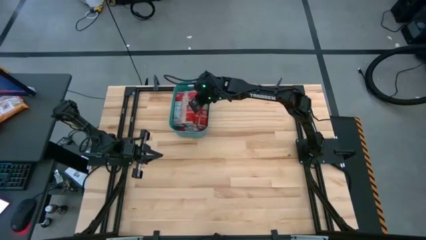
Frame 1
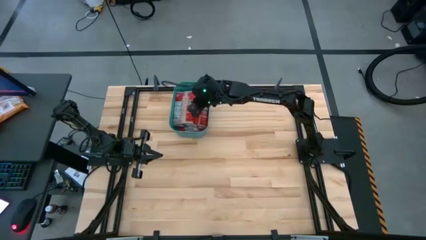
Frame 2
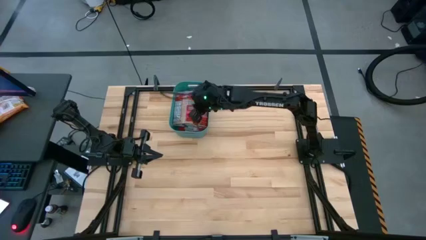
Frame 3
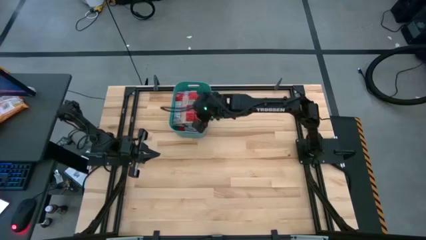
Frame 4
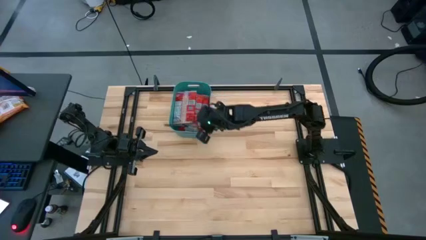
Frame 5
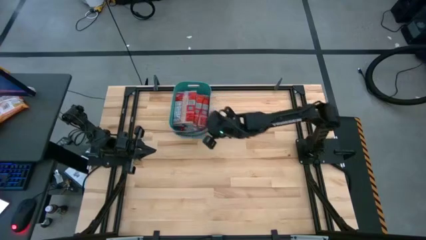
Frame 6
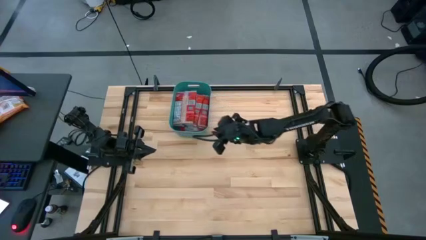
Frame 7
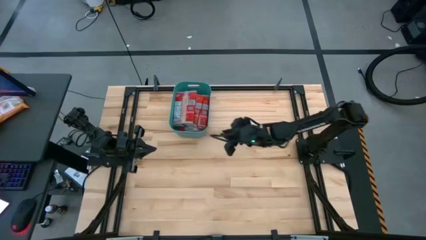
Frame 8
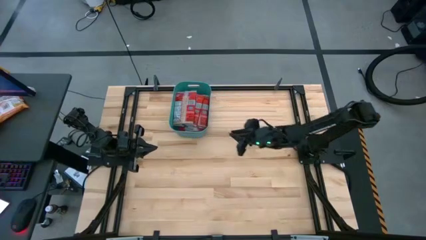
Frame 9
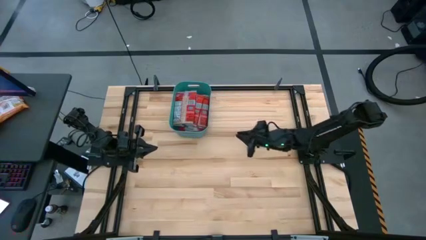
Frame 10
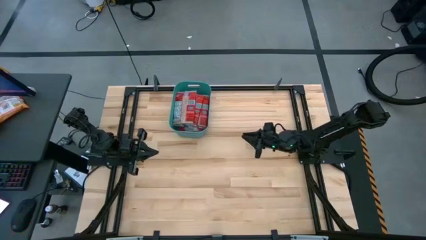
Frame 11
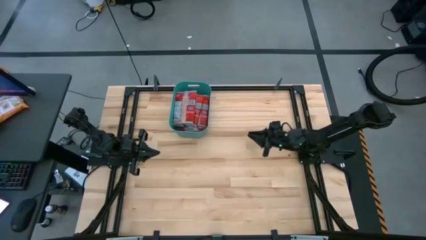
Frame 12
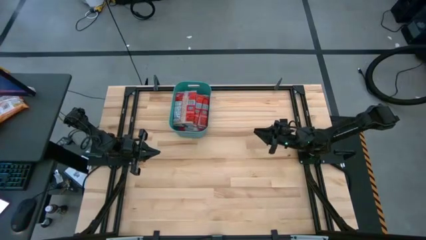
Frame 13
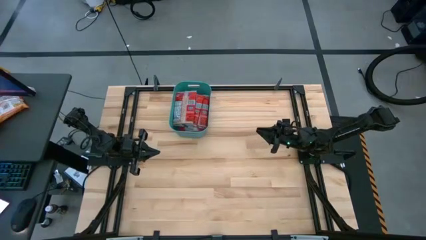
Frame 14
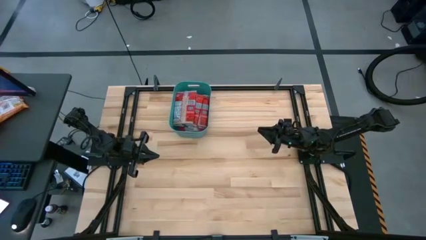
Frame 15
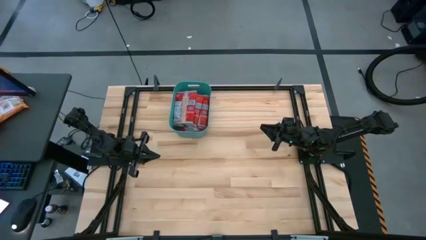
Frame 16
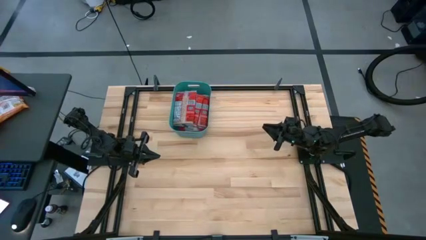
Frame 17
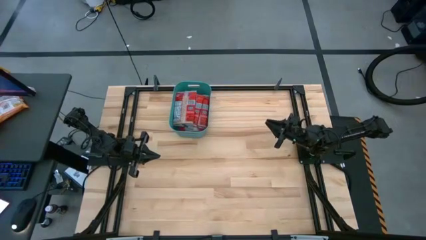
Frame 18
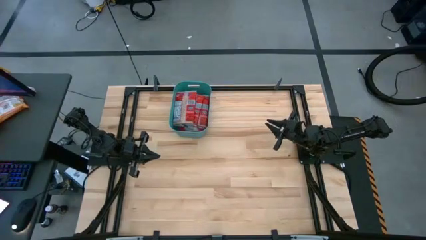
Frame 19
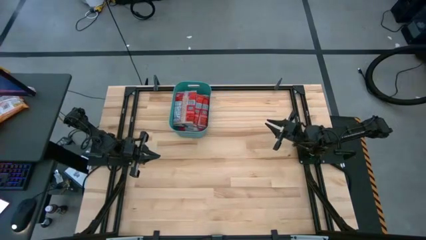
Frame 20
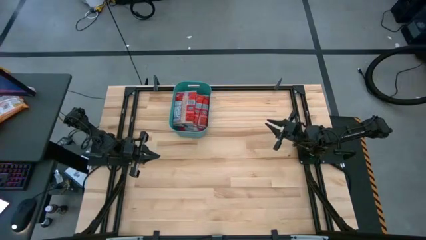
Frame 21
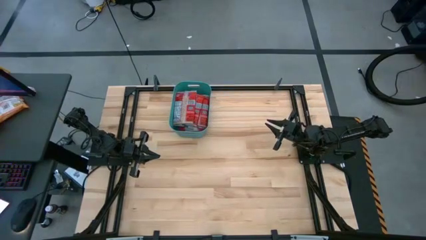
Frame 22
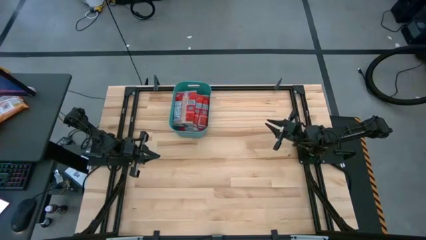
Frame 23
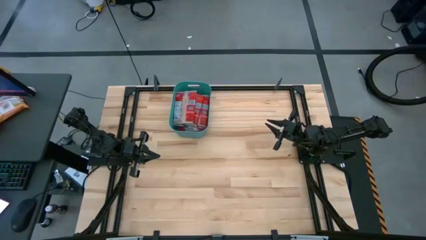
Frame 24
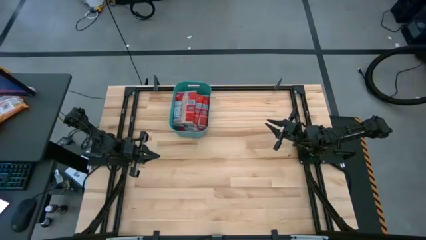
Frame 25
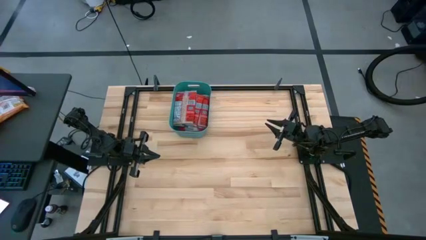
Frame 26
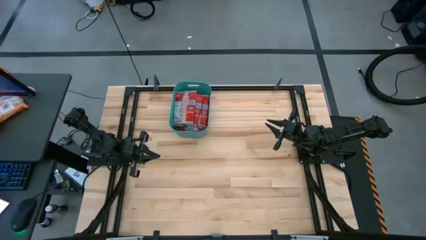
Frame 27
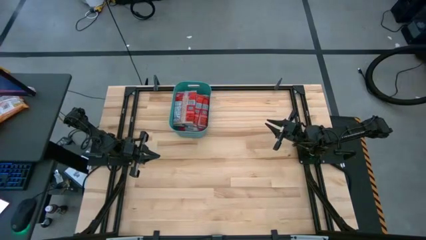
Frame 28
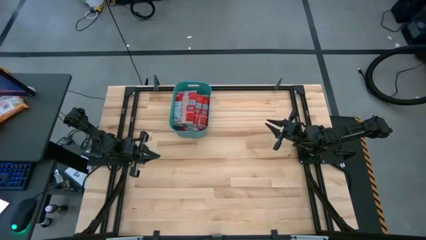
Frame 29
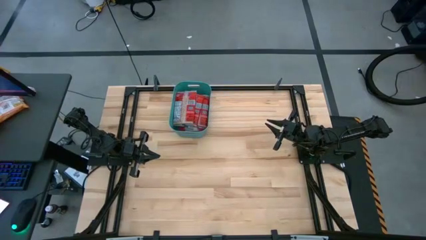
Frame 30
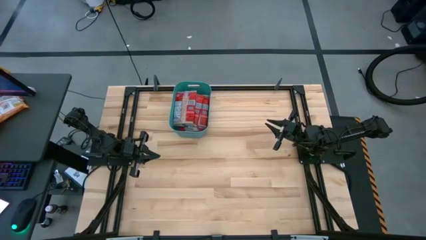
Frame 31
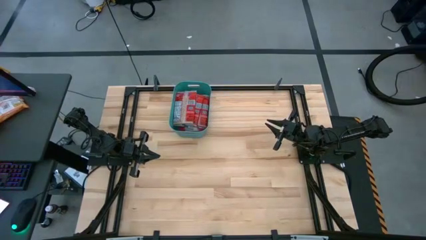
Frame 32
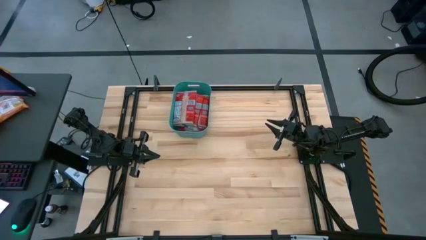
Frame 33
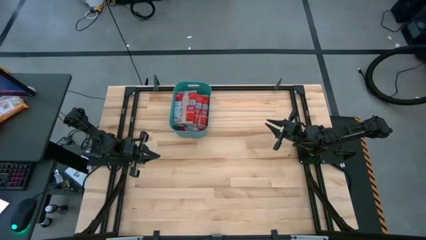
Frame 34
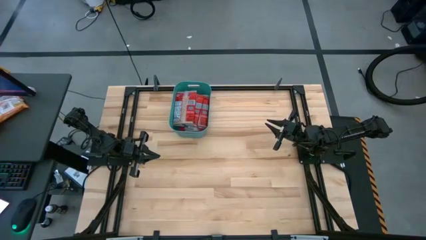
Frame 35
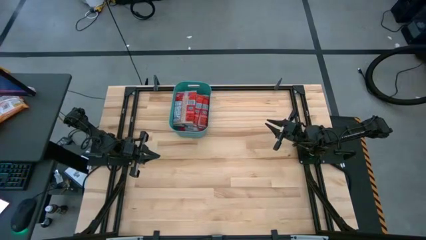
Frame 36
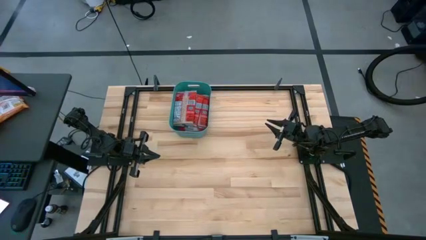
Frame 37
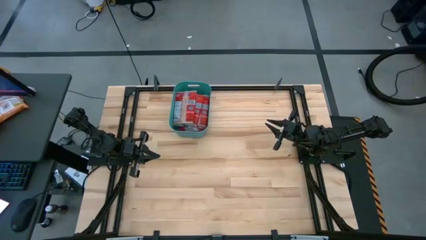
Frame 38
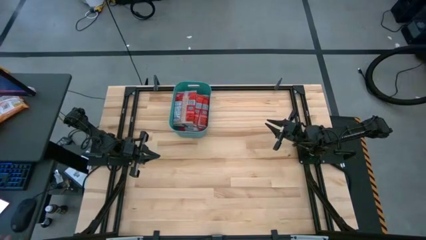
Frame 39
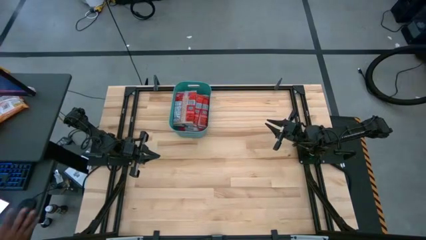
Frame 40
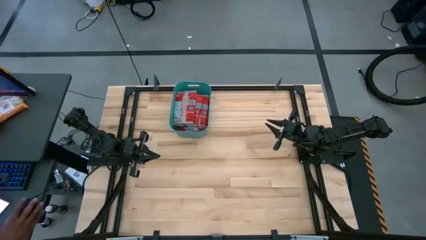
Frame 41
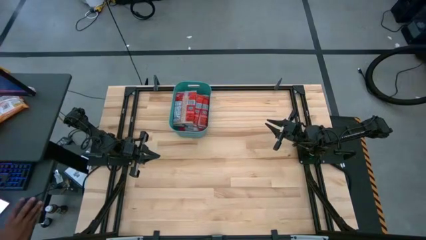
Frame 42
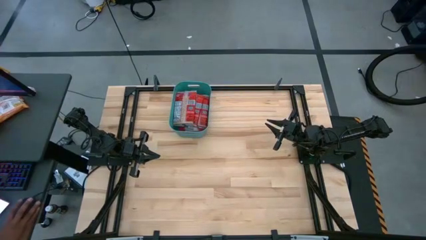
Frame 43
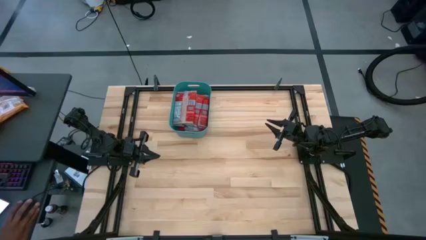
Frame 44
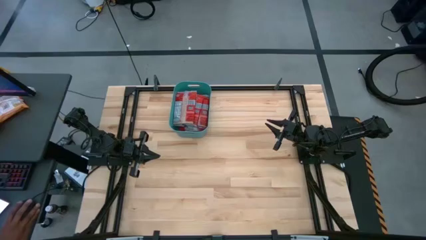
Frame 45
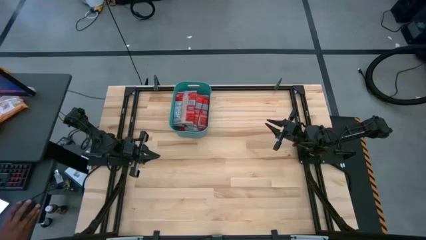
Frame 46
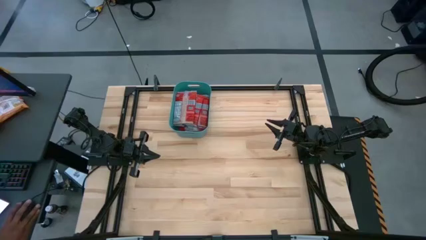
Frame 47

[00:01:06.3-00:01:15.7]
Task: Sort popcorn bags into baskets
Return to Home Position

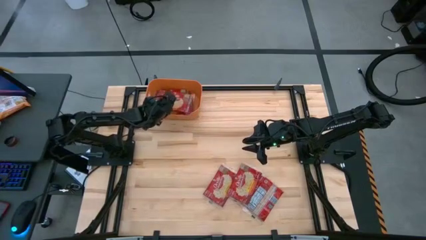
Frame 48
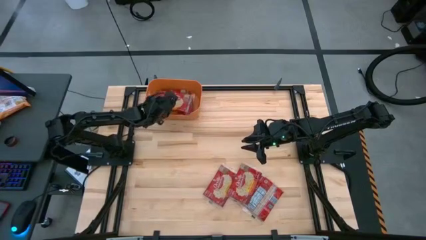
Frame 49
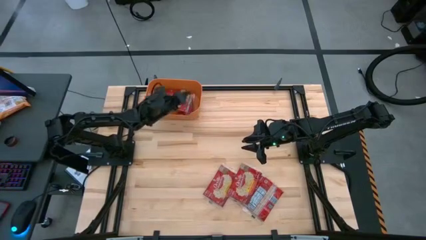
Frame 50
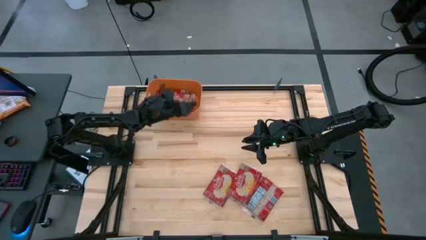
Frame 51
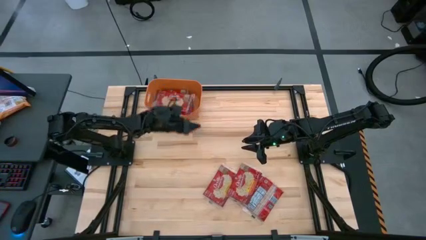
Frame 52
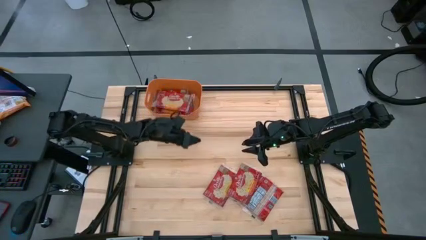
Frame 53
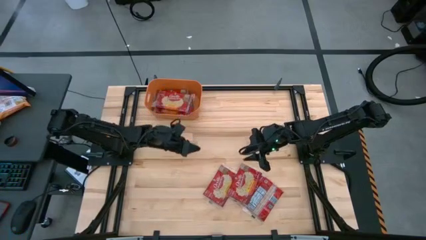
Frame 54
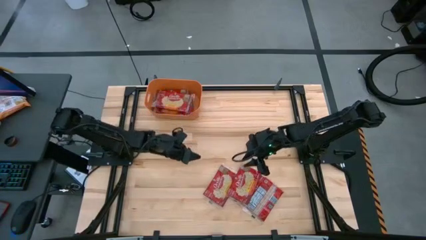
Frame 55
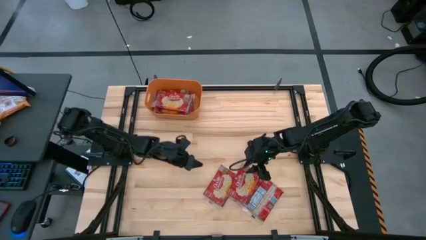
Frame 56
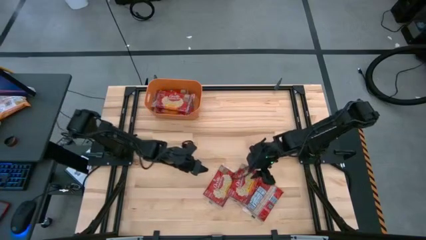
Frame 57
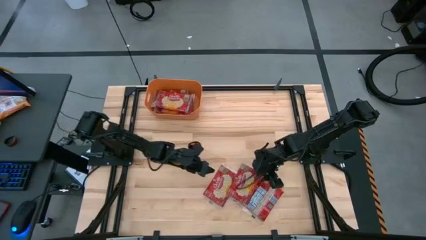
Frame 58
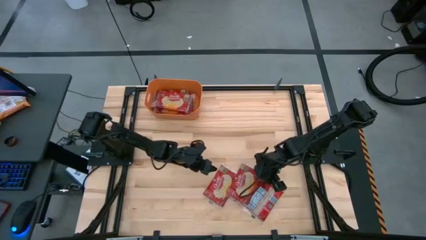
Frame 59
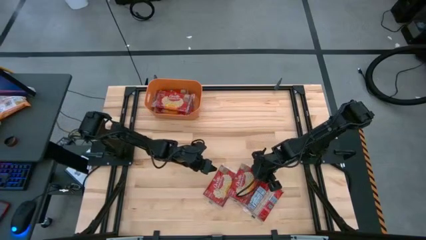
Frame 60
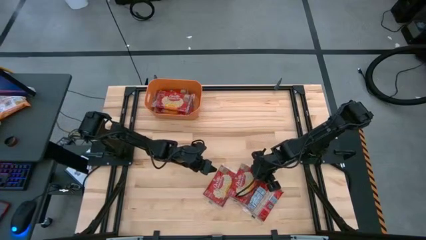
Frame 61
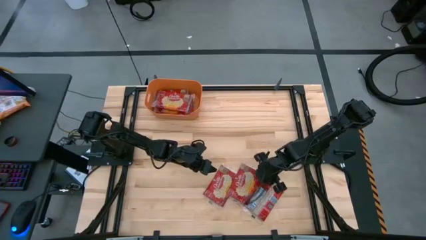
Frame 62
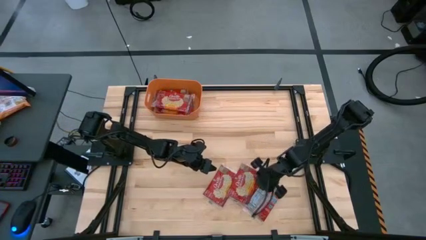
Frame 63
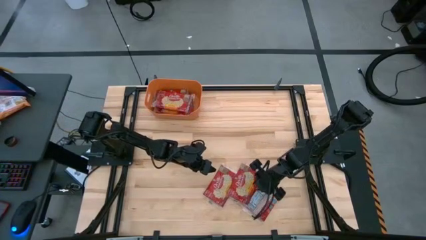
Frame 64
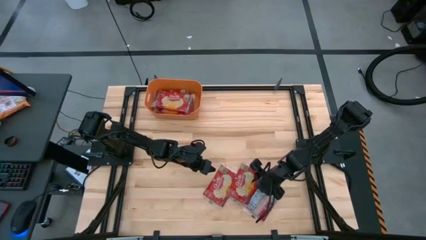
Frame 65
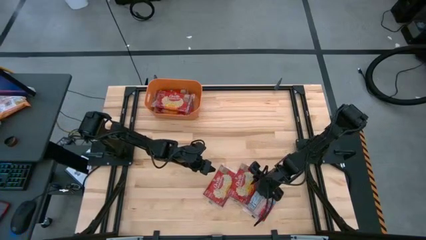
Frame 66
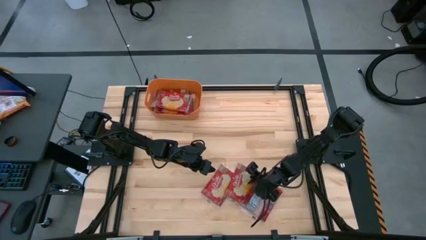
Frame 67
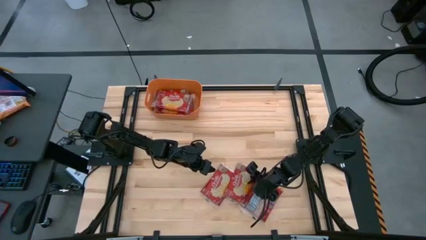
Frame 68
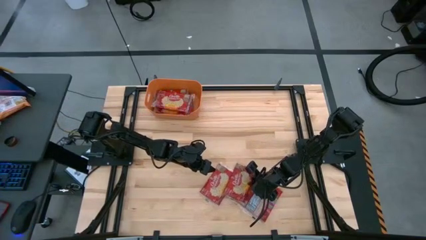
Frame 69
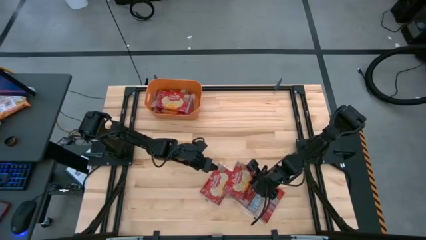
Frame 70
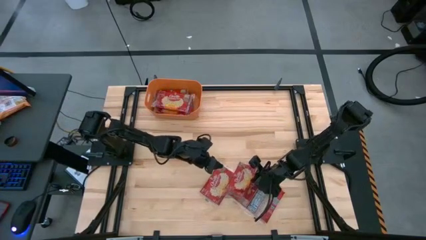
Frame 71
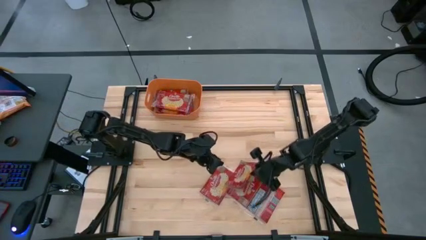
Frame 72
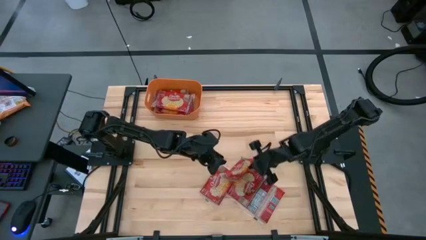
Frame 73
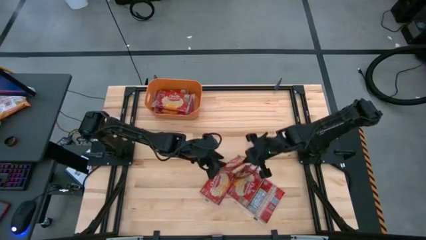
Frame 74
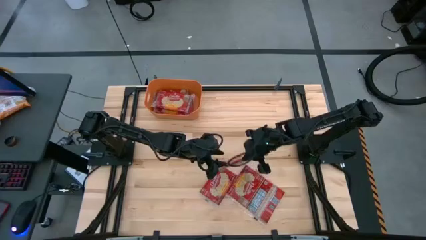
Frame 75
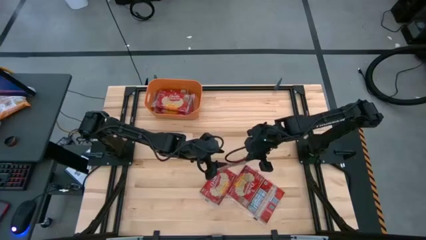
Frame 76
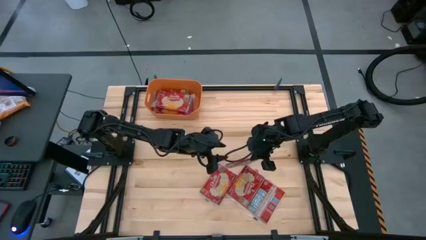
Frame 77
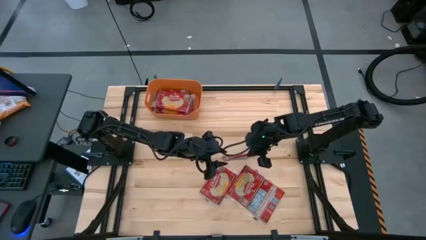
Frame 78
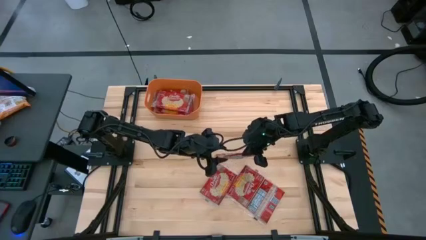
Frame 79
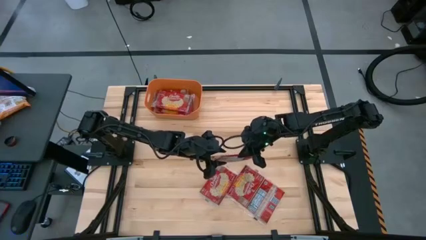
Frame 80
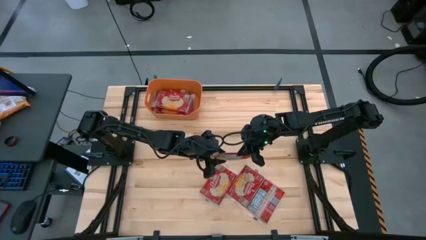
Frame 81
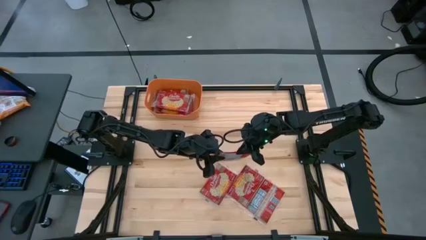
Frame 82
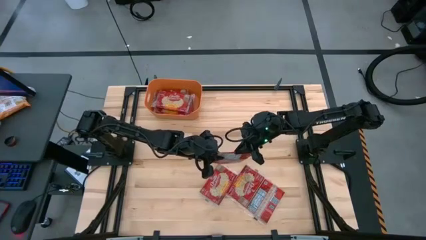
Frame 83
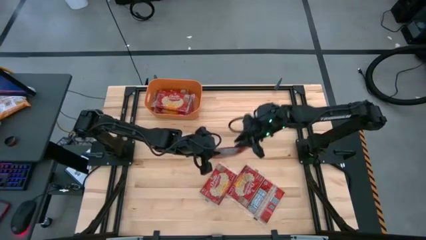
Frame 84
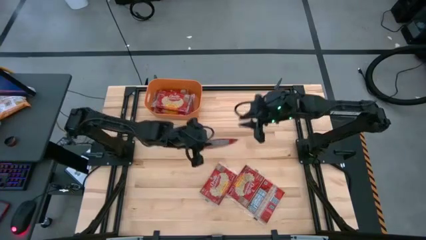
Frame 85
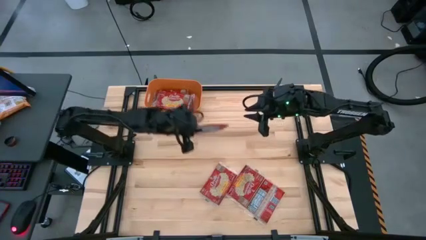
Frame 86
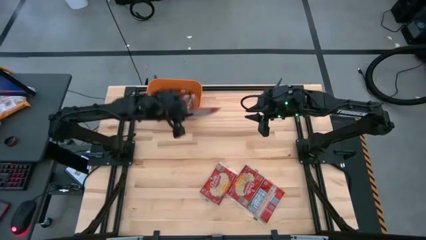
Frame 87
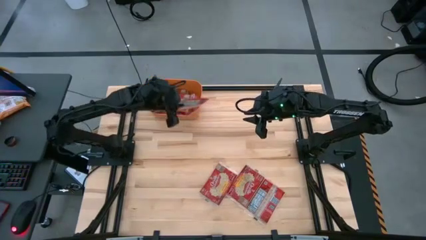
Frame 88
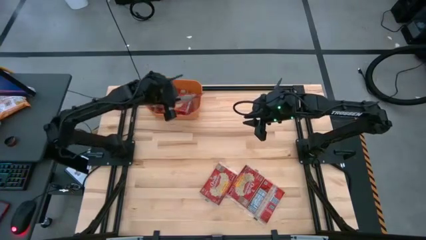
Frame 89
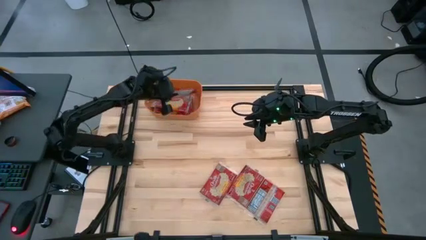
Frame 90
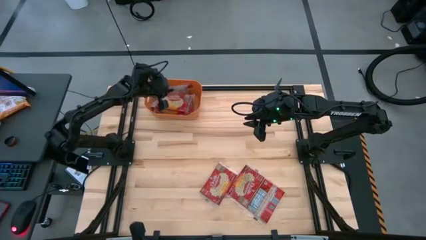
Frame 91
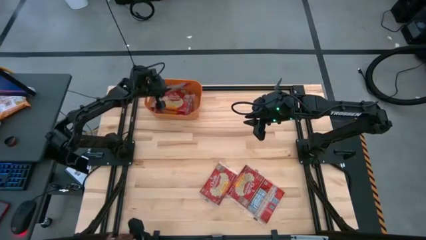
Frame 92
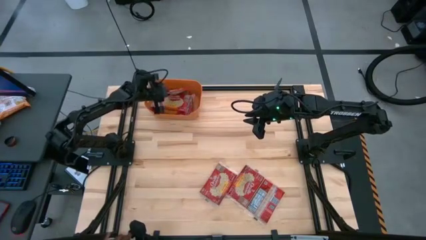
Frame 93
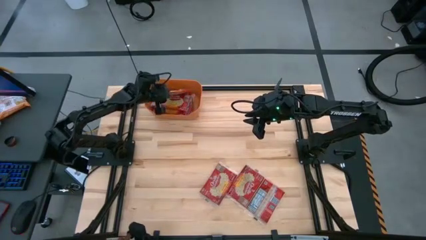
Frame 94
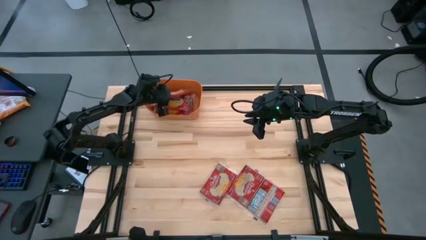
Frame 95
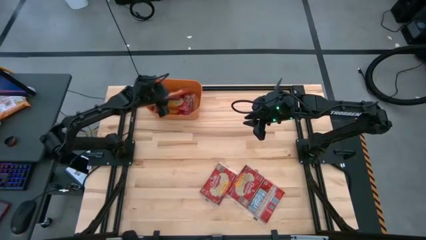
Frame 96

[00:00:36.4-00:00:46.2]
Task: Sort popcorn bags into baskets
Put the red popcorn bag into the orange bin
